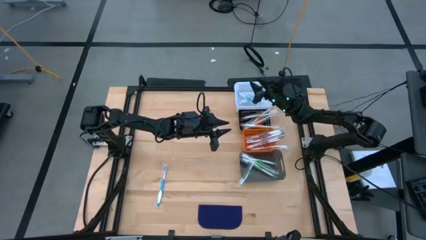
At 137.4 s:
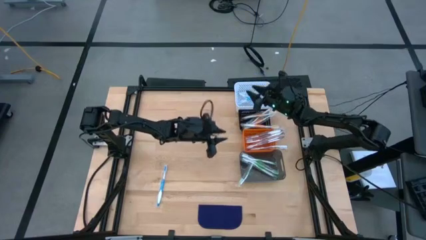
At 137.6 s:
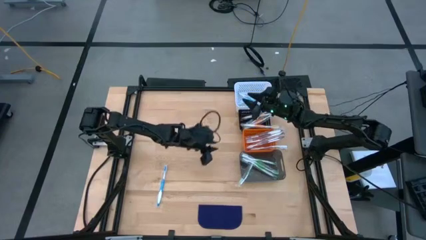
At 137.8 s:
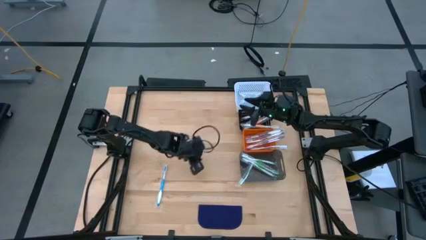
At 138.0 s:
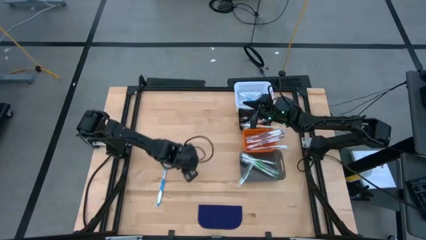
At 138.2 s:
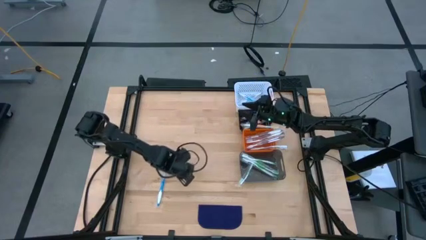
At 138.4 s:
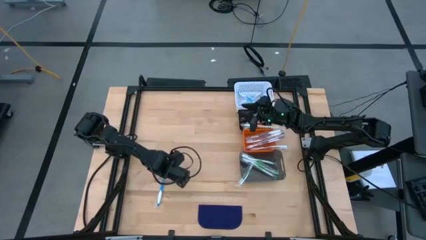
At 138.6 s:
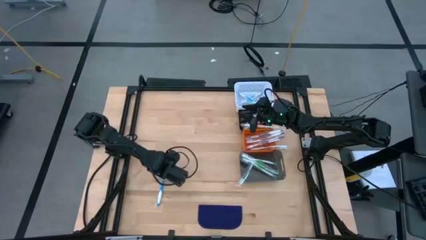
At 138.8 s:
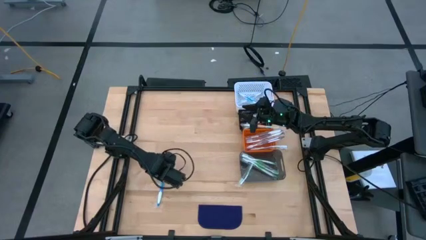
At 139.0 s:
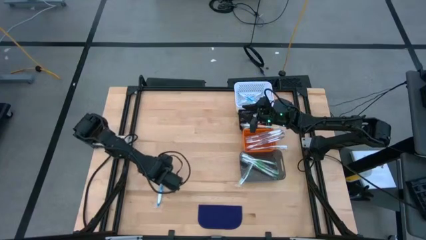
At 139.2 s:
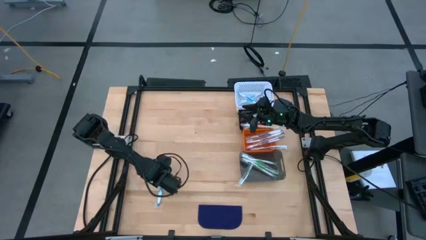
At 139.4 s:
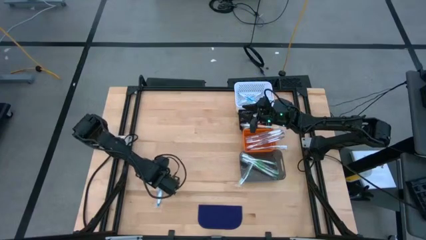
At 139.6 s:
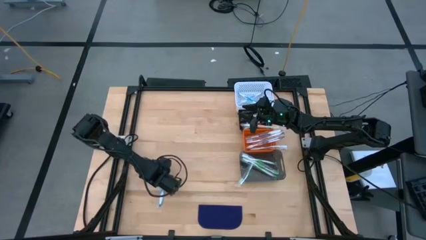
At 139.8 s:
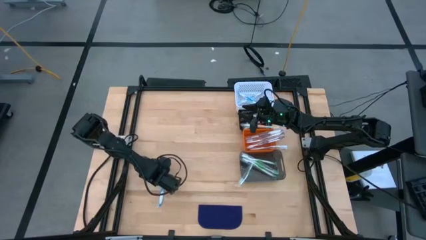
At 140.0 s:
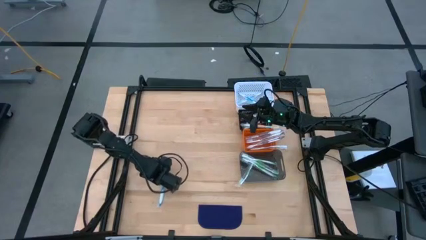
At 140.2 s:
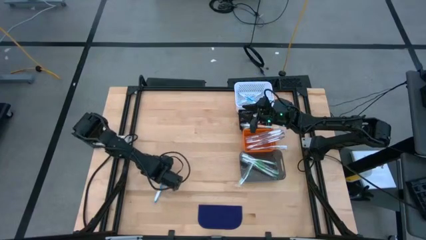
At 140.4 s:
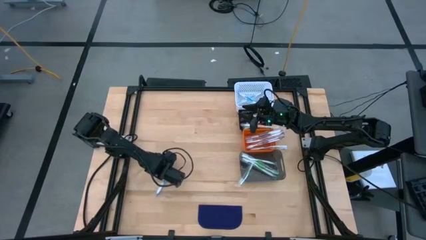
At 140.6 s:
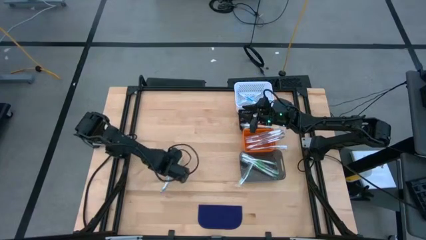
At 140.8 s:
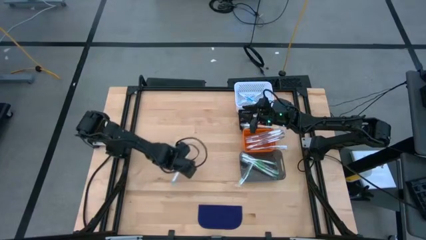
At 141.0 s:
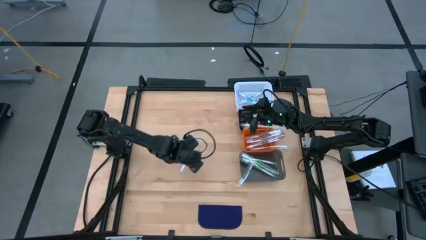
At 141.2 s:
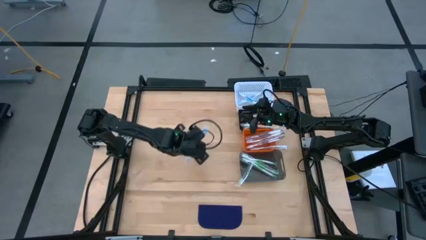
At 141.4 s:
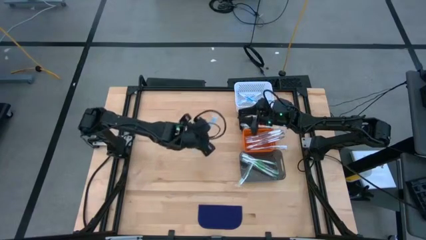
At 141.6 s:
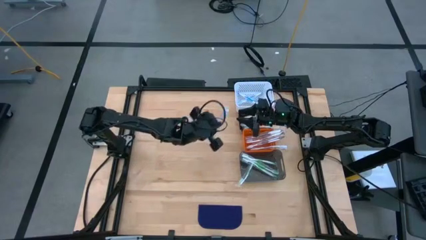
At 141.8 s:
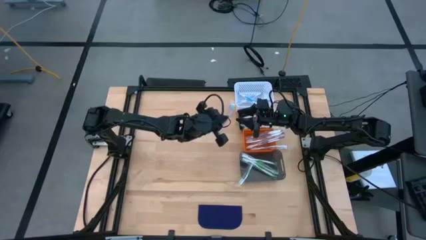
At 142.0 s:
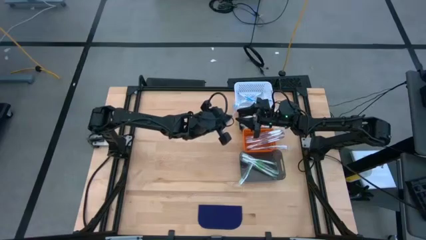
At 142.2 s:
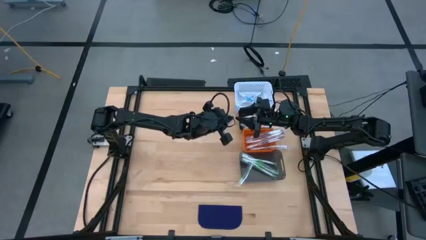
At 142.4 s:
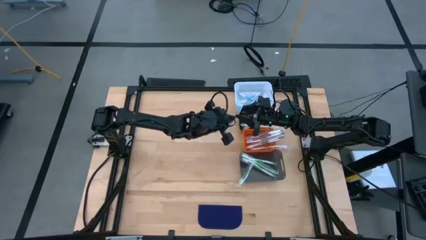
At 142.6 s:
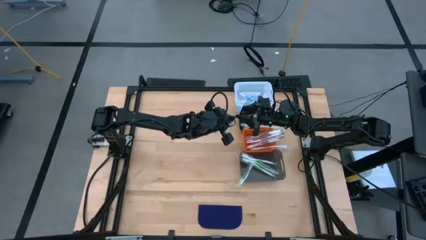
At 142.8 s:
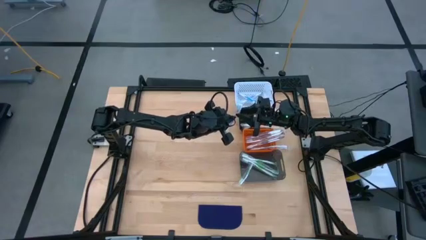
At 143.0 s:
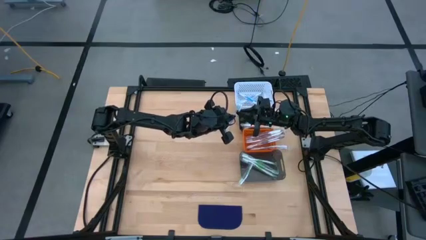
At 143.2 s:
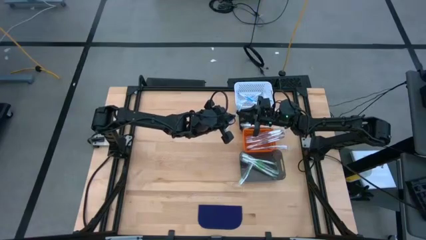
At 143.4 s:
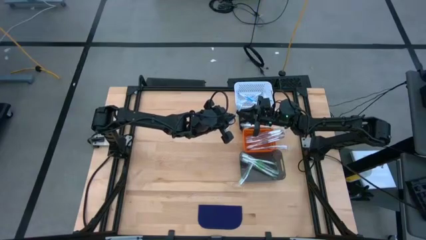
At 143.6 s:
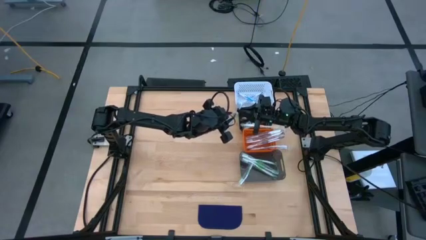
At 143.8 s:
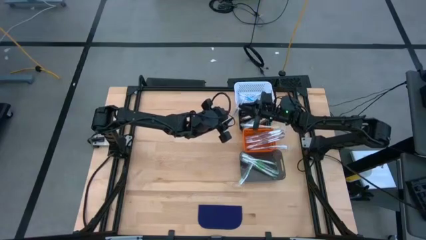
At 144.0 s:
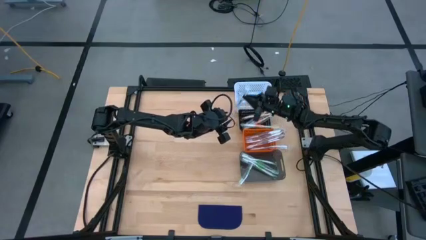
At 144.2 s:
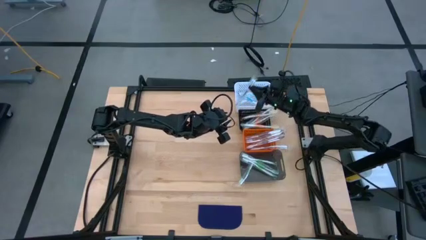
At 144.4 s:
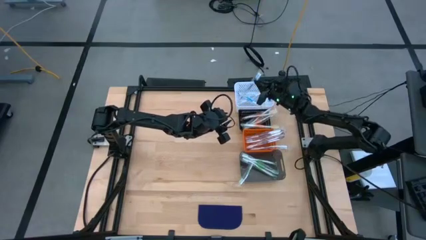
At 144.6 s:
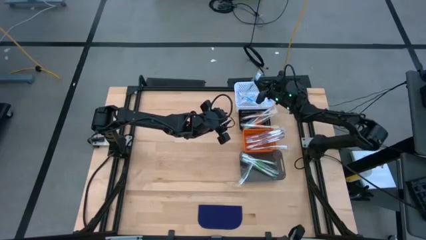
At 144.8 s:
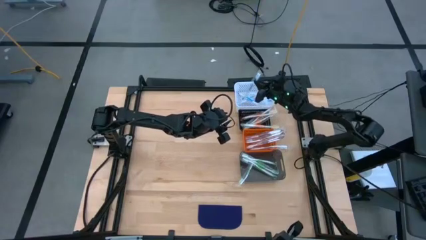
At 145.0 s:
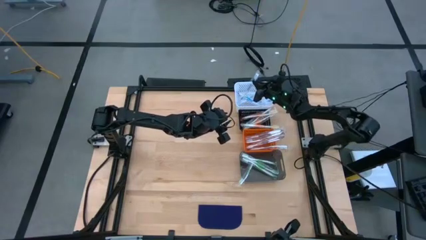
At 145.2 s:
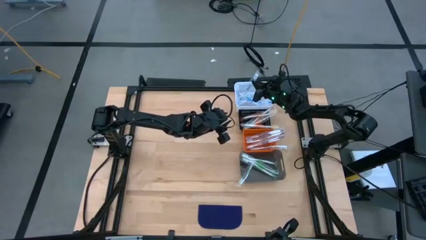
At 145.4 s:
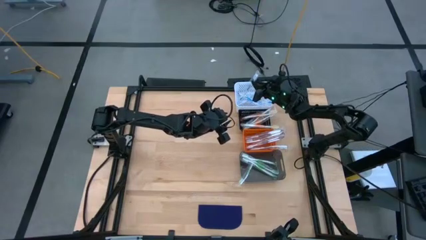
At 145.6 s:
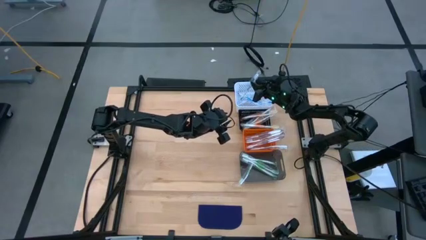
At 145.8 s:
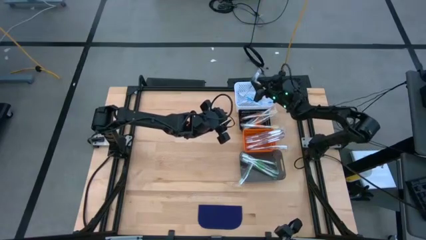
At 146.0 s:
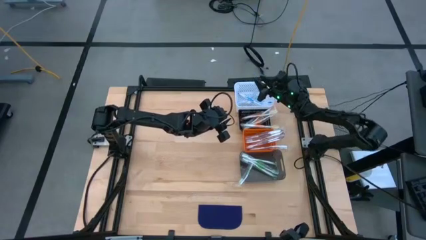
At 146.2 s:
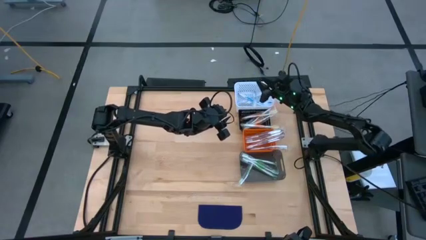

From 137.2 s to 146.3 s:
Task: Pick & Place Toothbrushes
Put the blue toothbrush into the white bin

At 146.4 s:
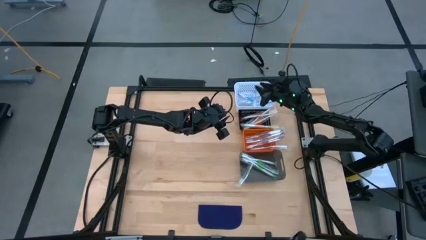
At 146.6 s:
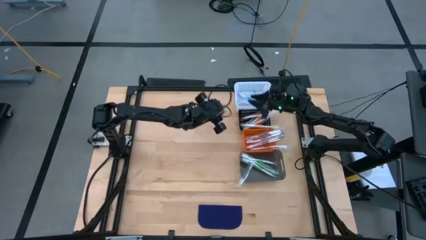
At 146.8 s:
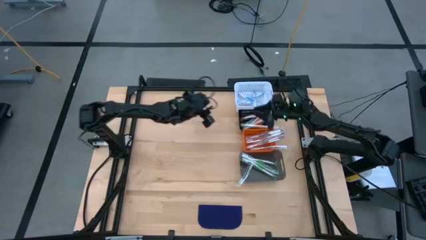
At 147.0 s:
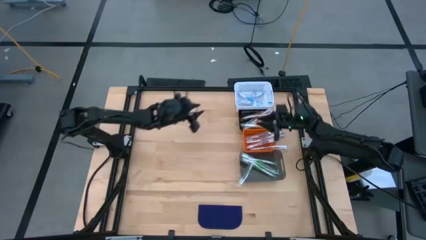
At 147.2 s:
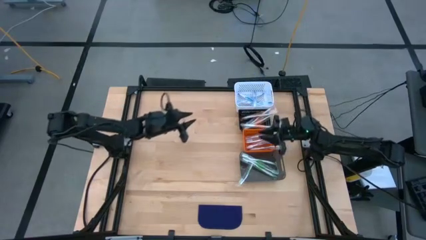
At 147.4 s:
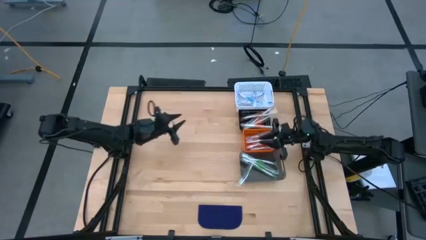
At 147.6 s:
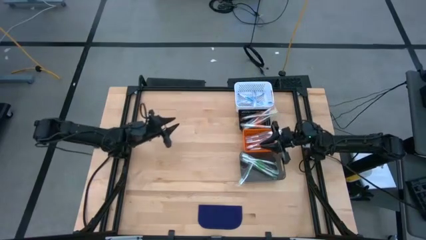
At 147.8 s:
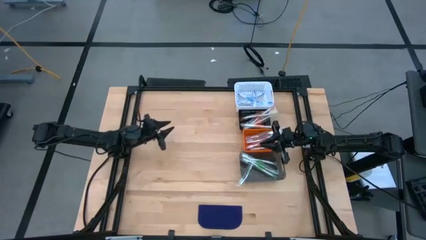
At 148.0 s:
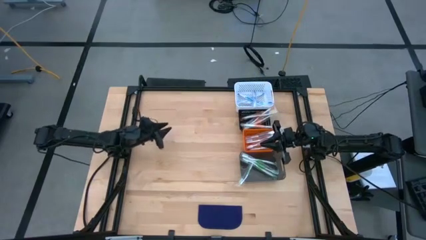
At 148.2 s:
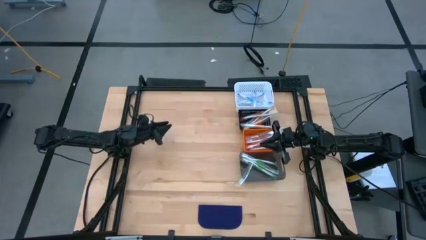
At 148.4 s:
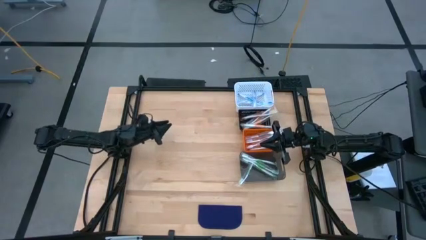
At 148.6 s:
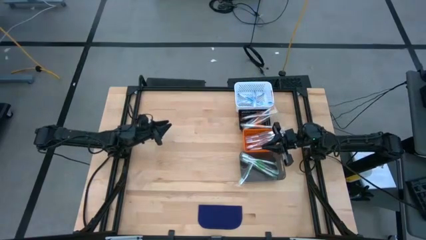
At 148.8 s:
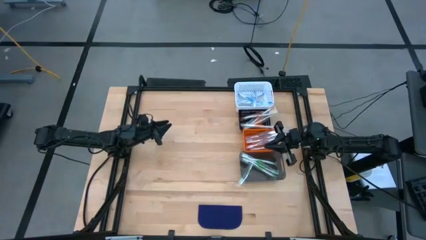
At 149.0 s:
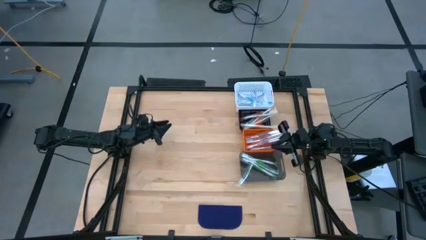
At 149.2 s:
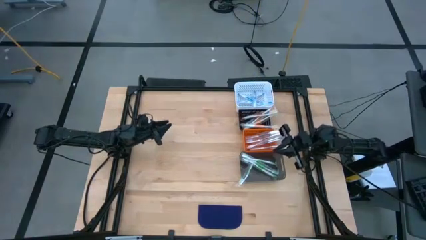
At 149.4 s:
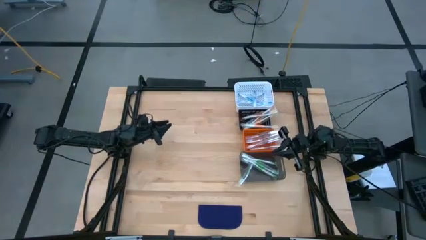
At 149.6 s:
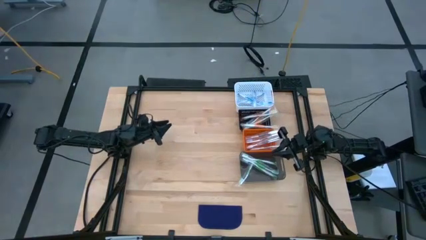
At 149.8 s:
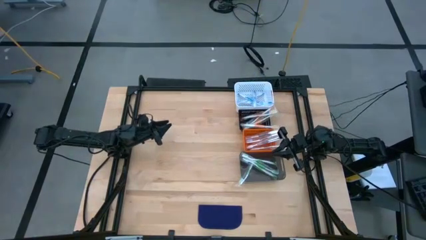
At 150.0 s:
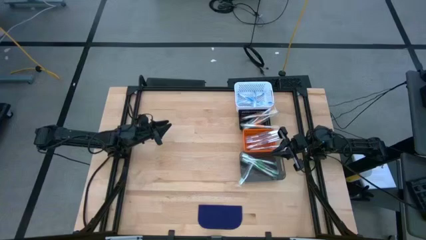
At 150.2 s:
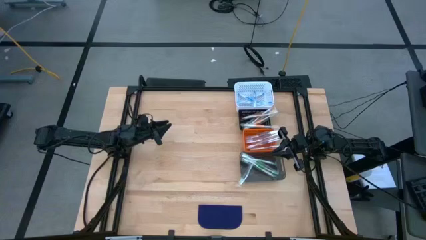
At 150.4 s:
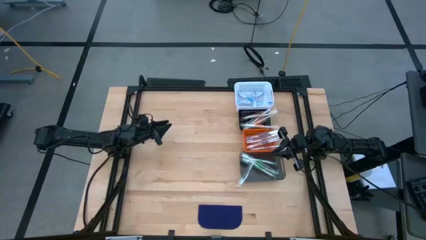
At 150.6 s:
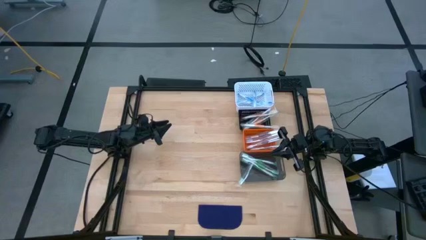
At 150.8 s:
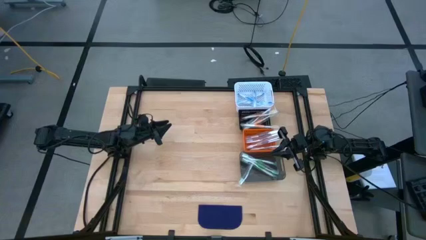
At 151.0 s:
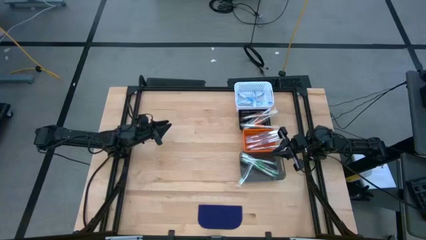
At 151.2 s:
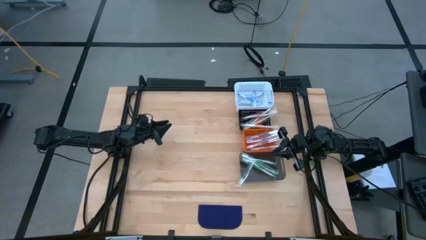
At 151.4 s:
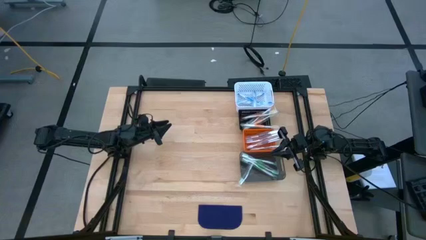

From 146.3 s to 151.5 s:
Return to Home Position

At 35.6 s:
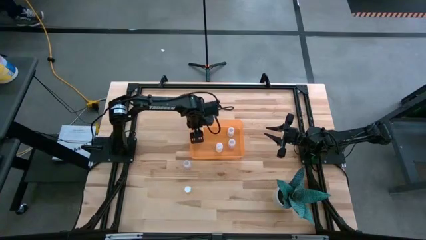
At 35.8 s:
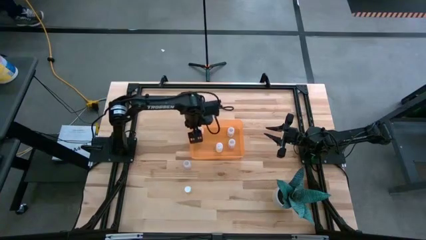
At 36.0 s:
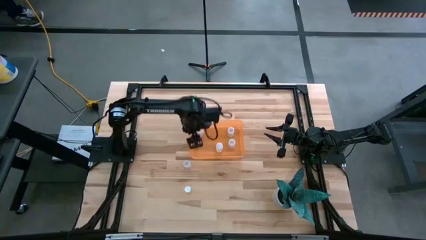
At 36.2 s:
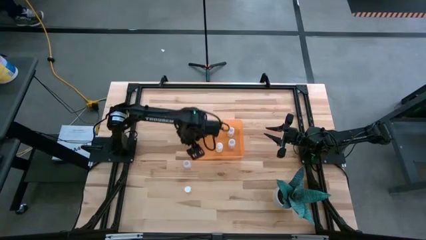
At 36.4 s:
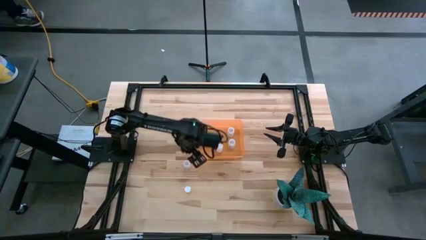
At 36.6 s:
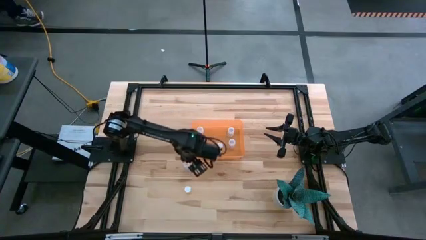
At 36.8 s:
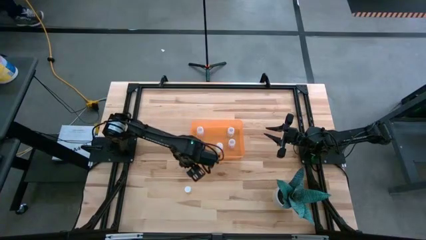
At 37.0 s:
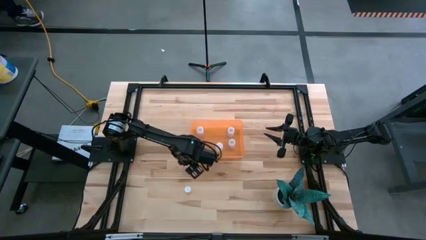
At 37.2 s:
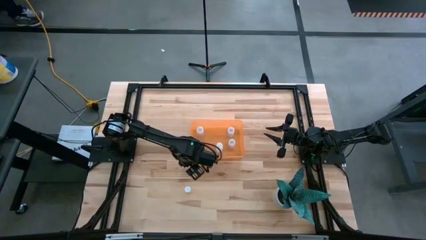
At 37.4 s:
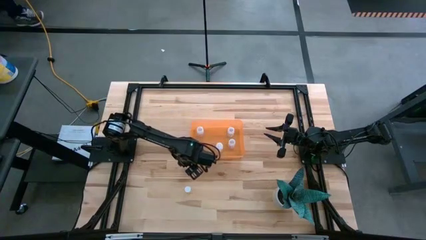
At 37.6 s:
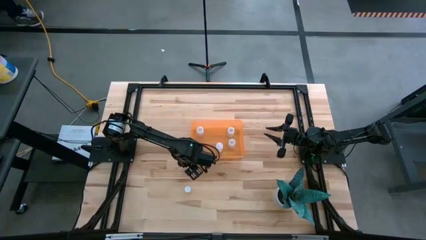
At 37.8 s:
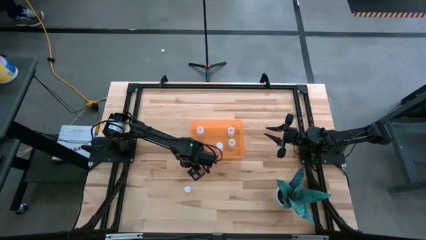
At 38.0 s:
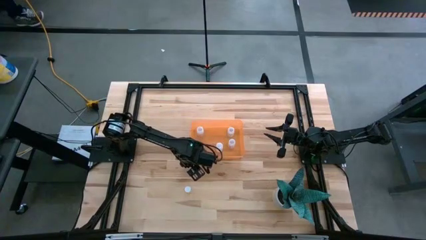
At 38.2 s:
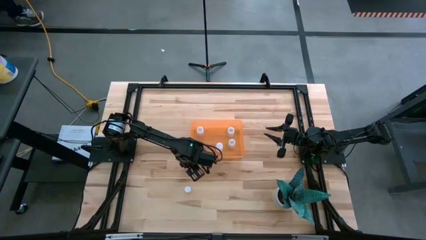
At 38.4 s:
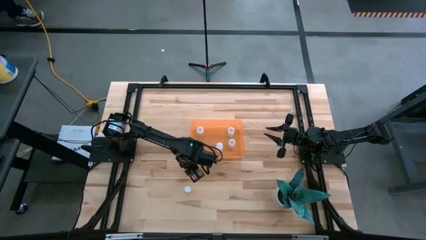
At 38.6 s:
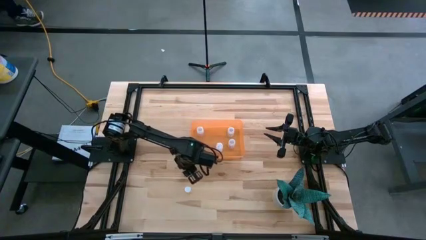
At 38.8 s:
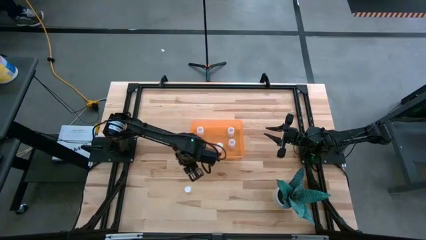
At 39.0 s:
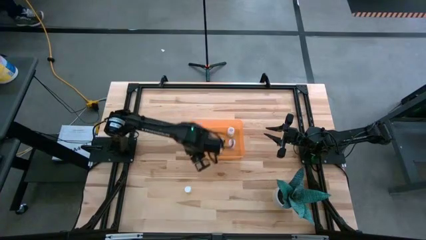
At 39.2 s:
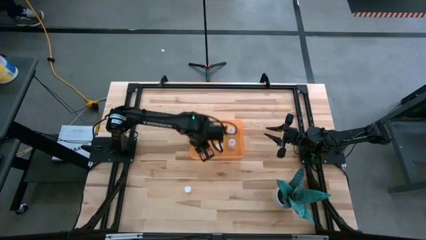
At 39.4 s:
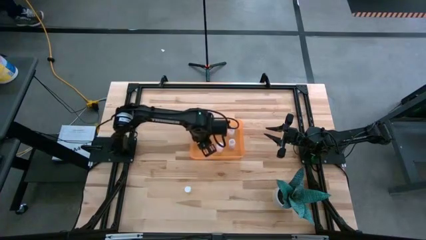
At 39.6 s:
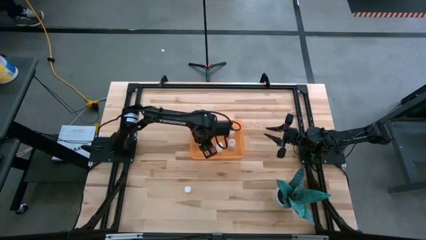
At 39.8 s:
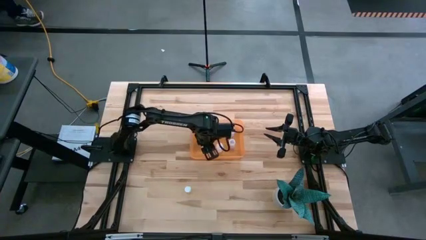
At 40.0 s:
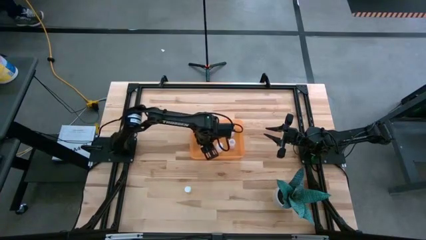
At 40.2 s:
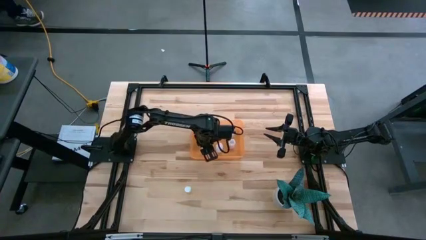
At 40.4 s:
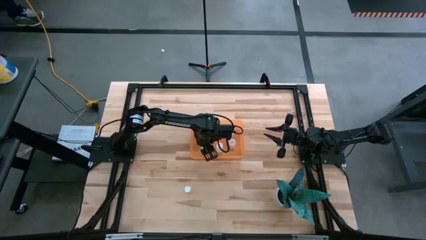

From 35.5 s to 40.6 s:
Task: Pick and place pill bottles into a basket
Put the transparent pill bottle in the orange bin
